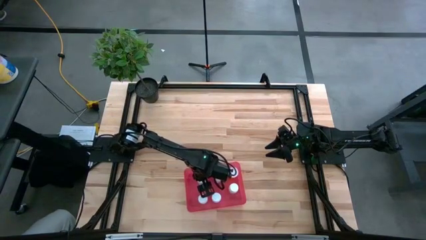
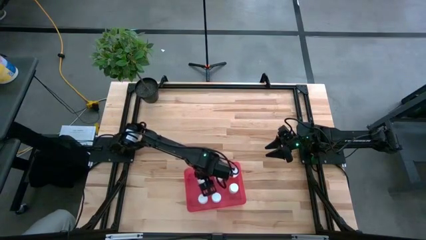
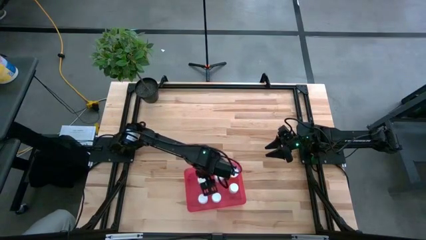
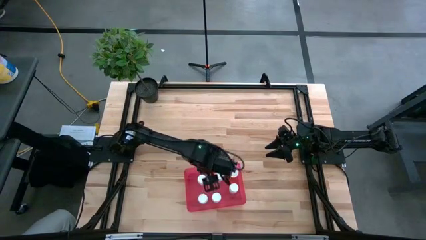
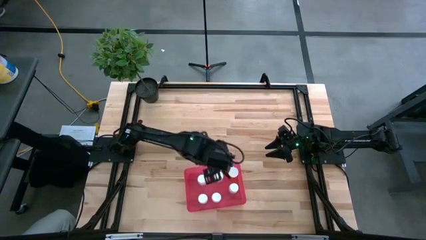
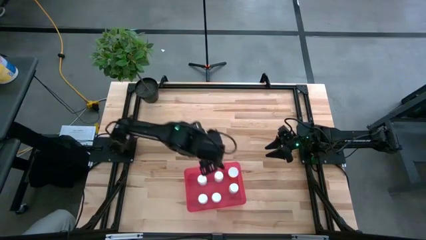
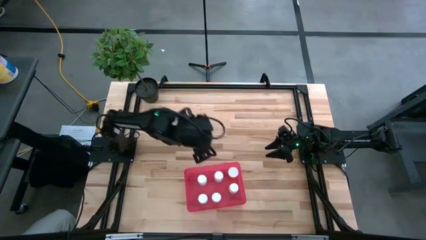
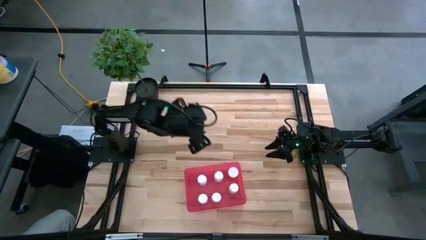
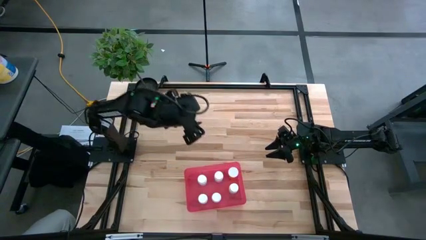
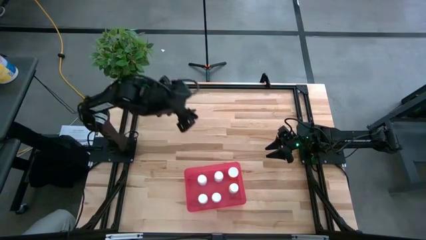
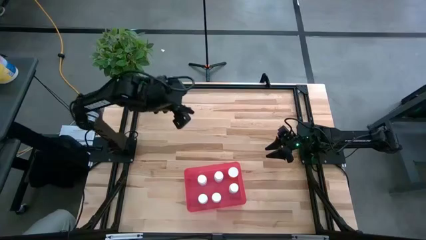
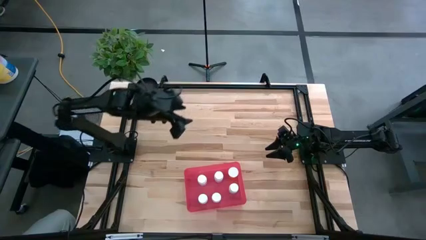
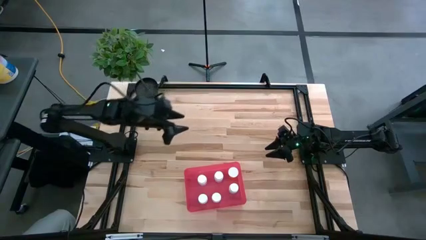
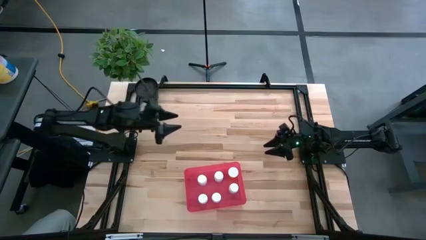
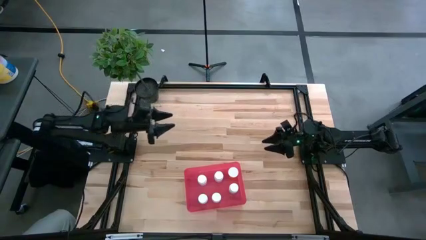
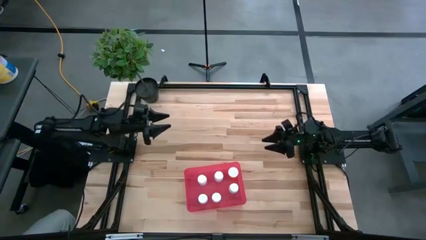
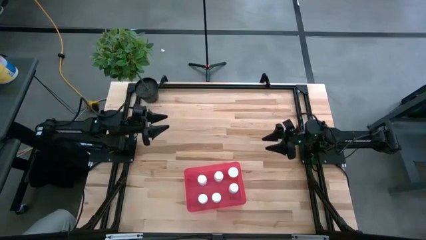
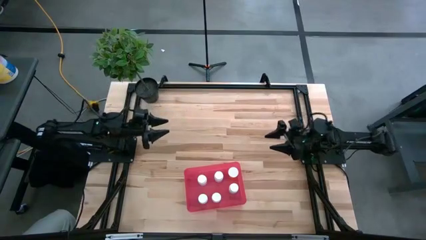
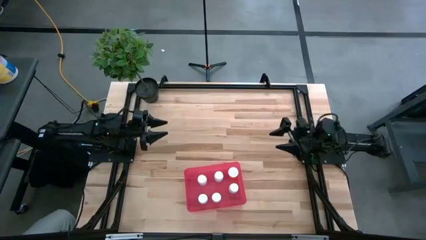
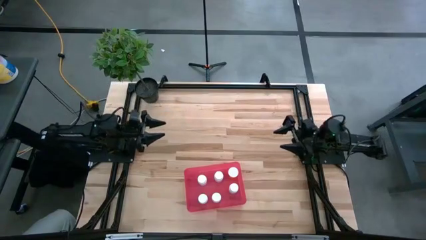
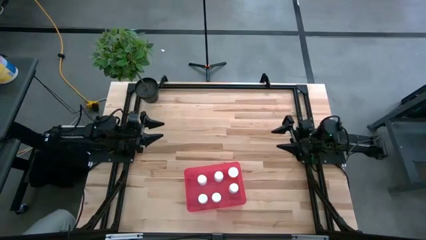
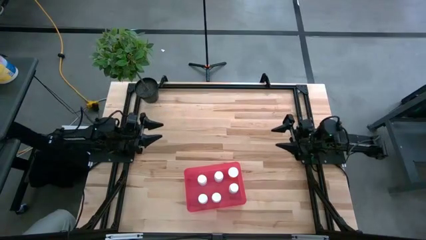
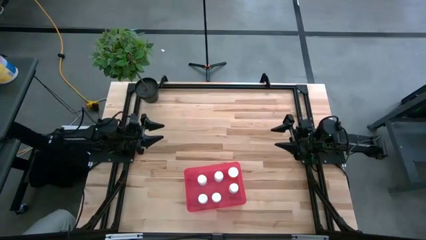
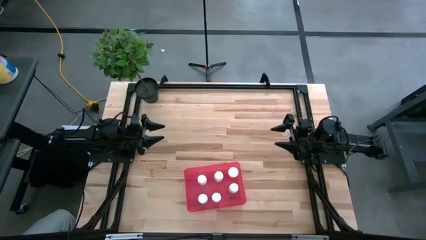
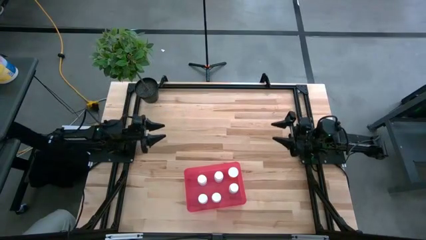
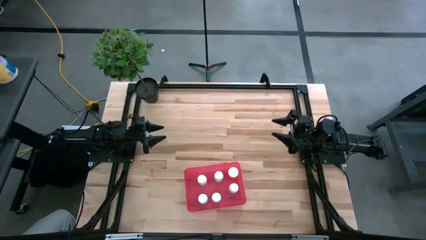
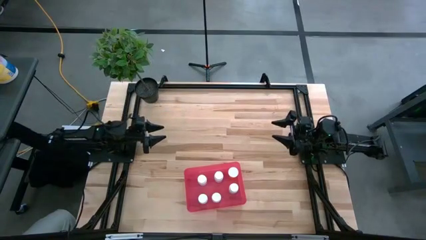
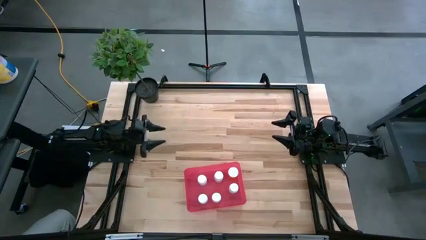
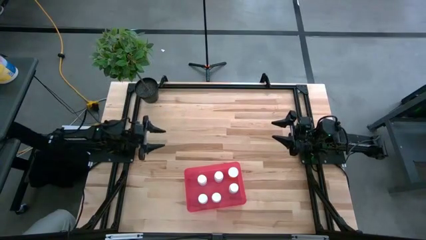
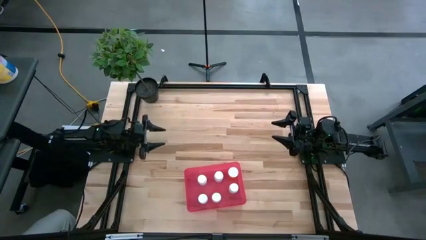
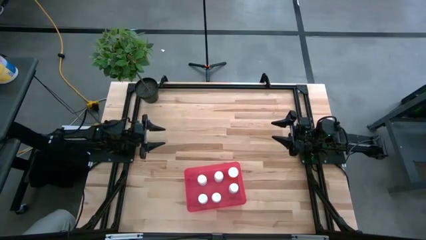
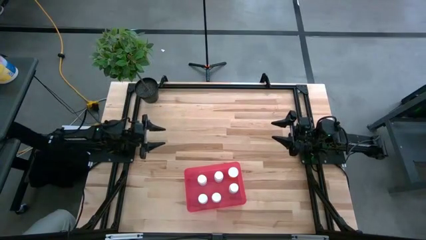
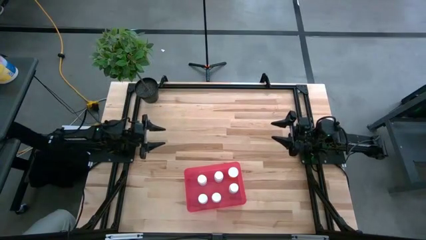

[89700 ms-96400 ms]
Task: Pick and place pill bottles into a basket
Return to Home Position

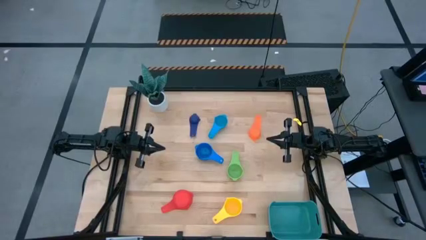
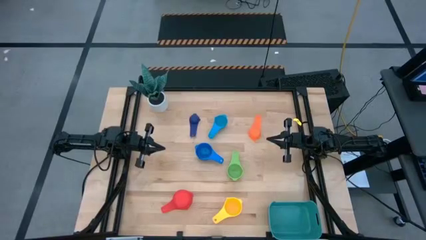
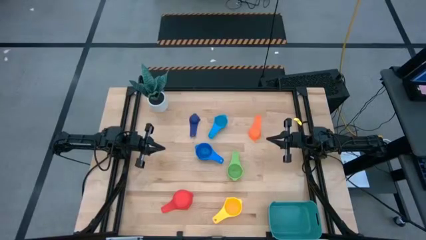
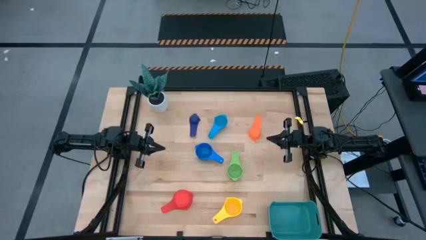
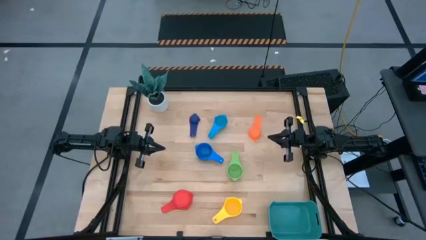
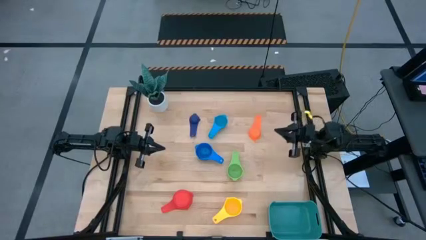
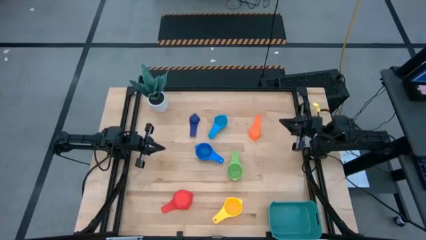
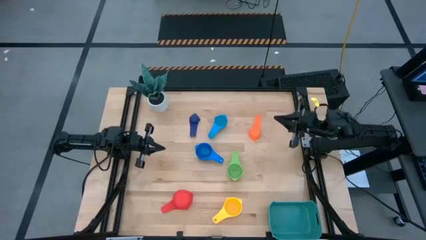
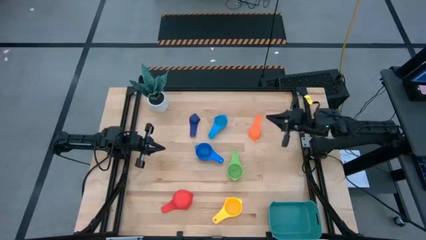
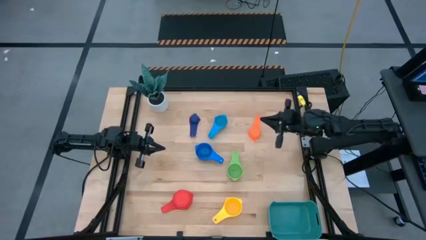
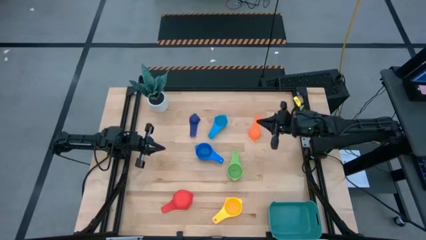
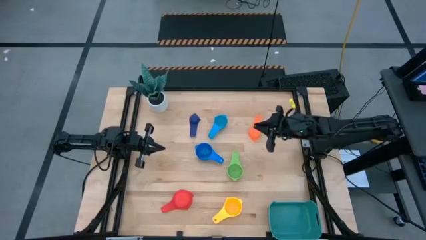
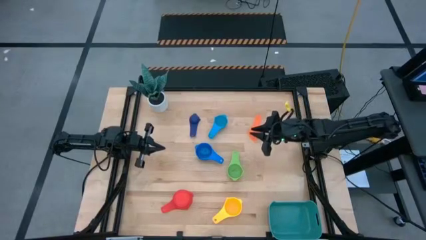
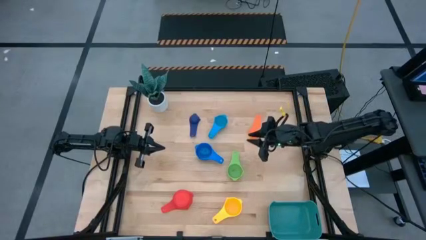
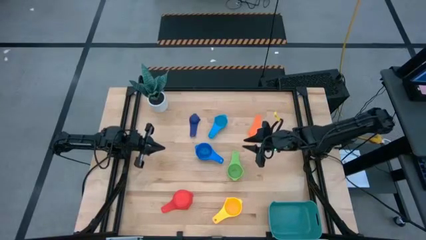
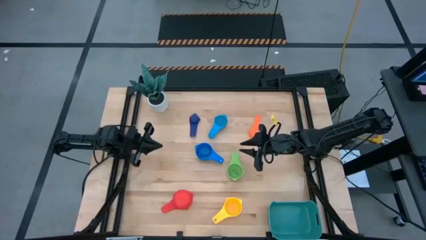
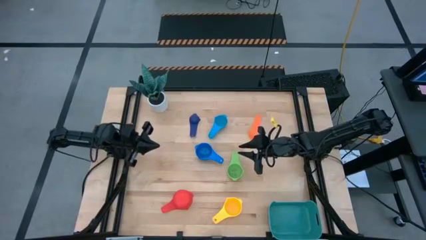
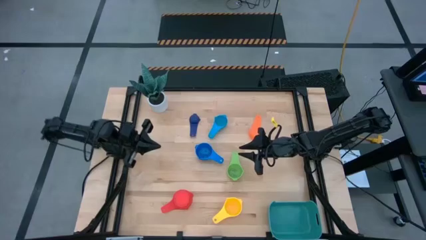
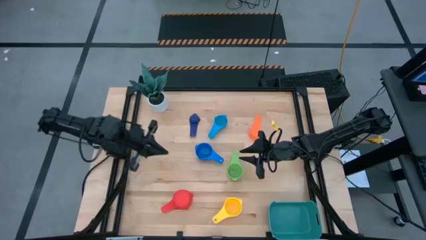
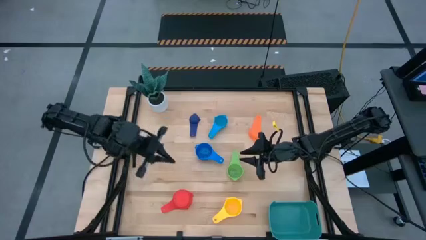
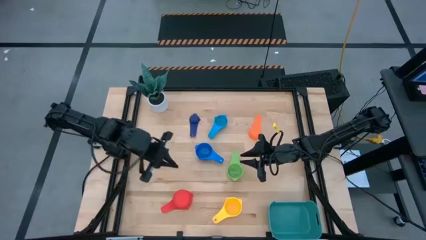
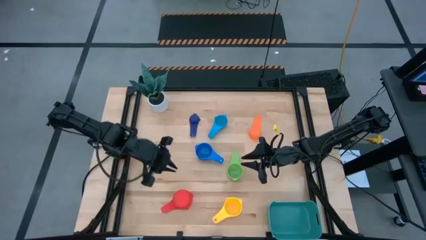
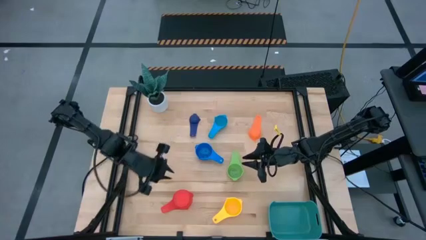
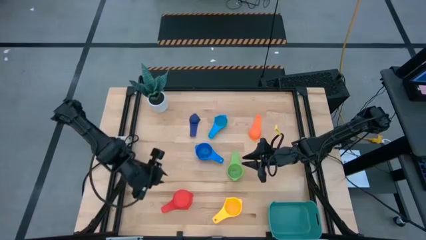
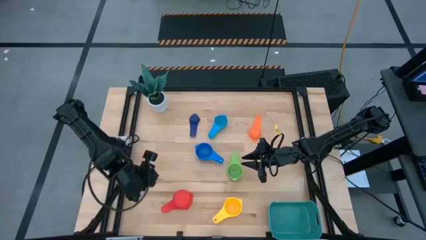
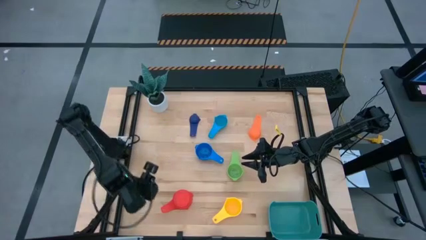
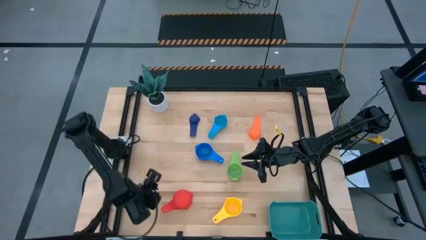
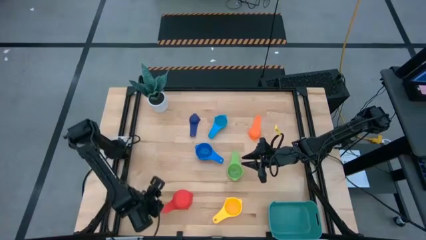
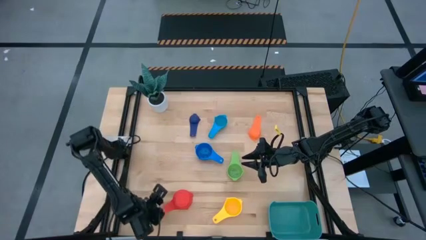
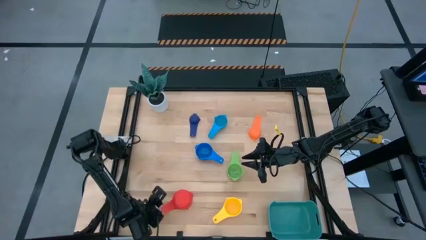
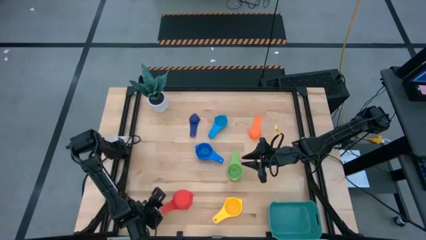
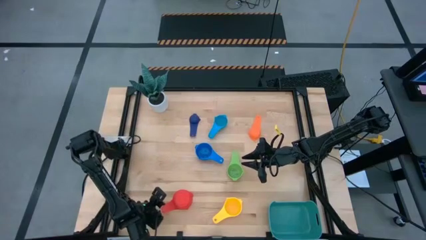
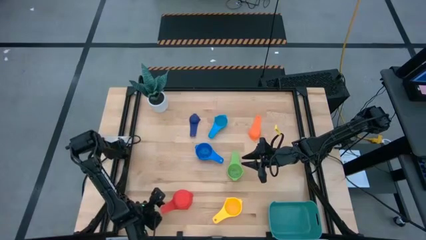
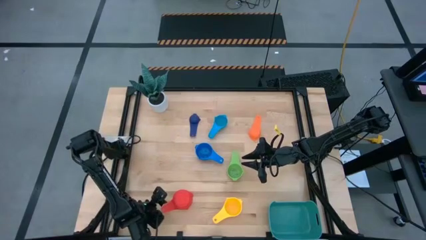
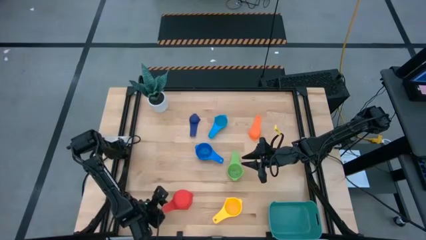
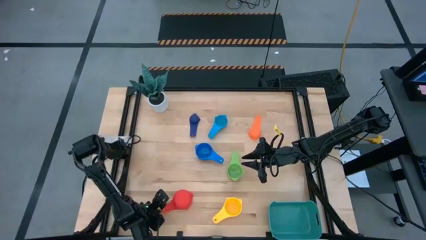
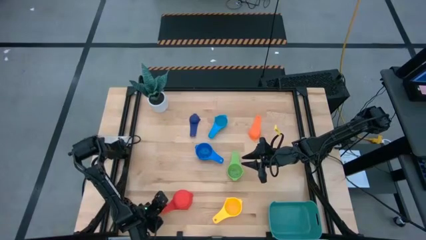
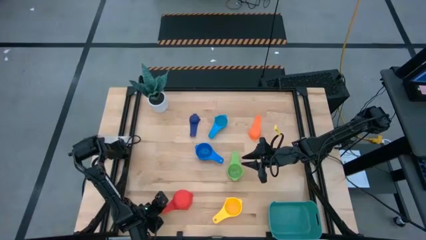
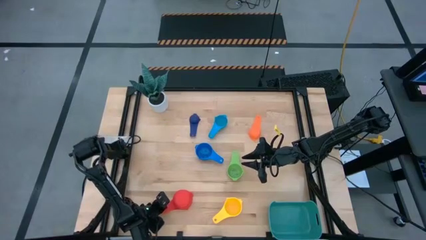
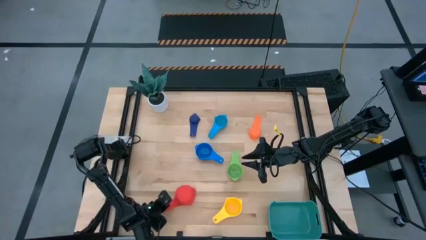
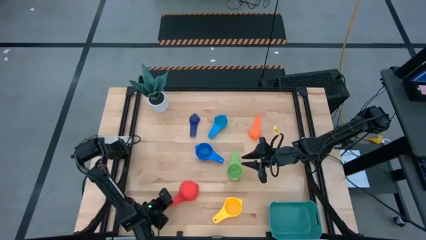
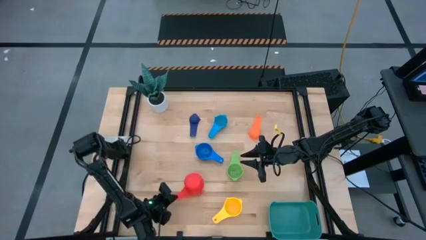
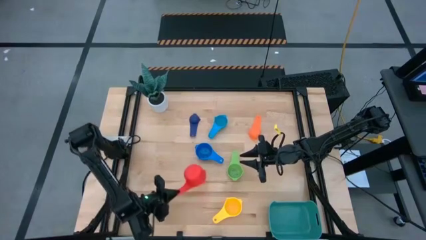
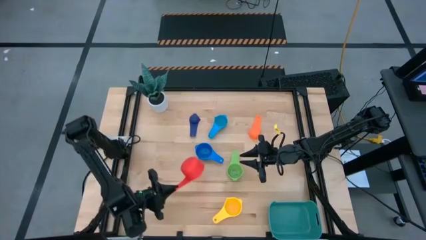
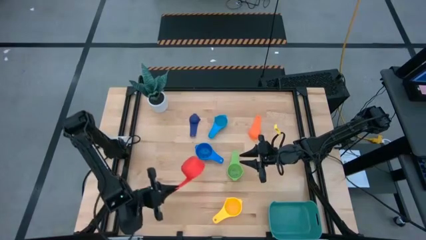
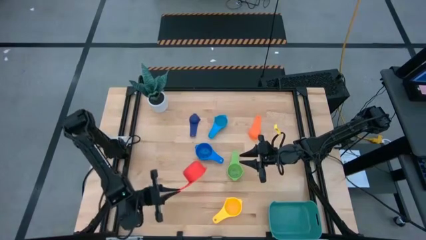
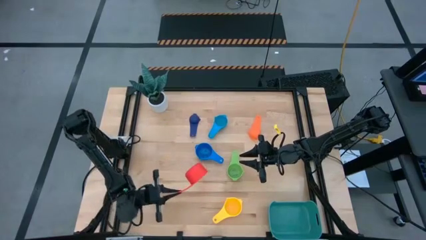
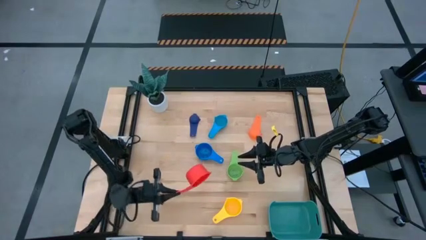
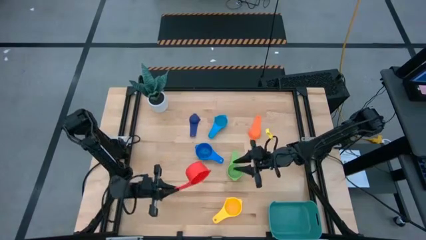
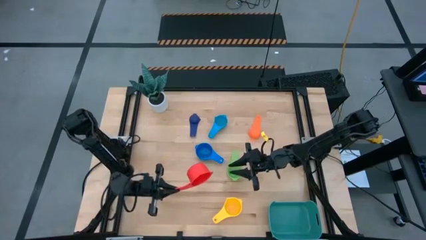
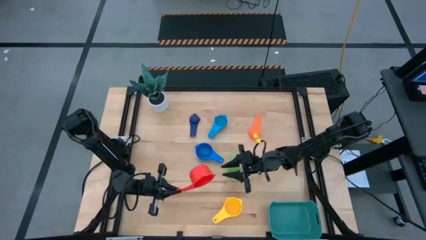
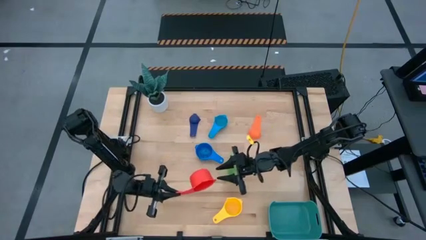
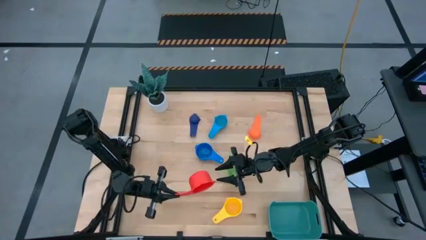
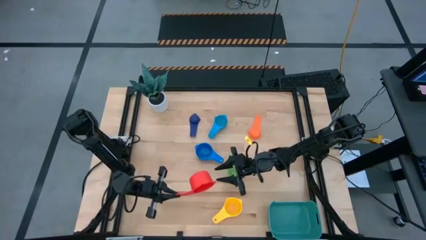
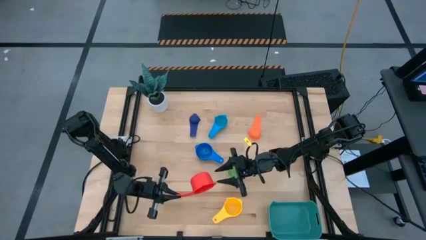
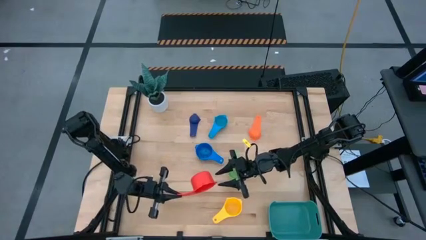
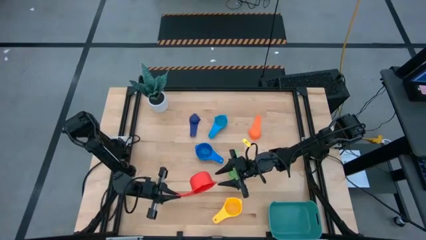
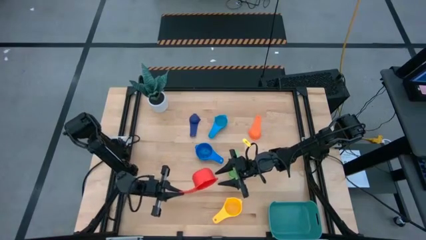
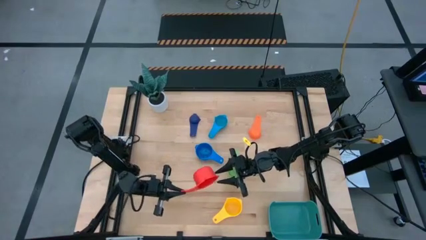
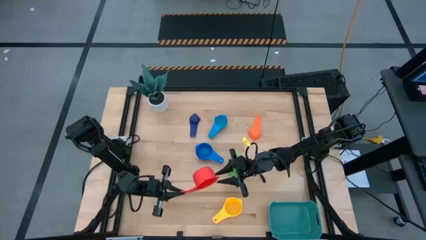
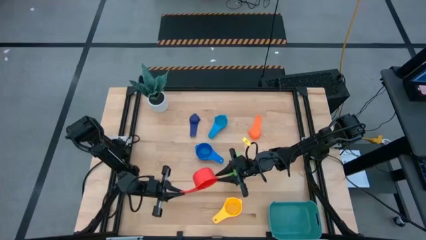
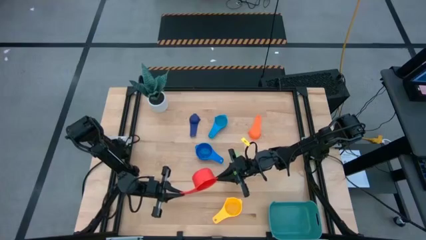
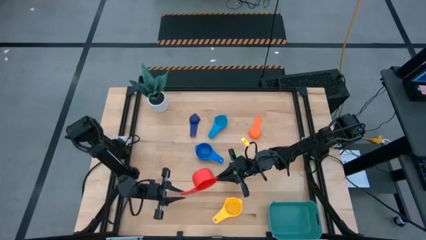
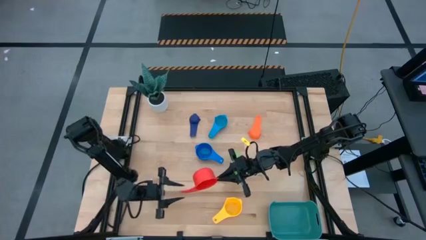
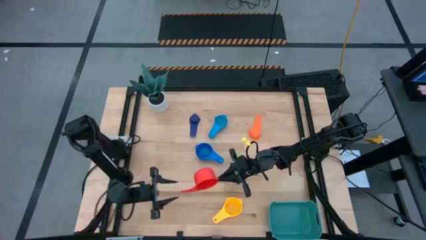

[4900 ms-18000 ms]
Task: Nest measuring cups in basket
Adjust the red measuring cup
